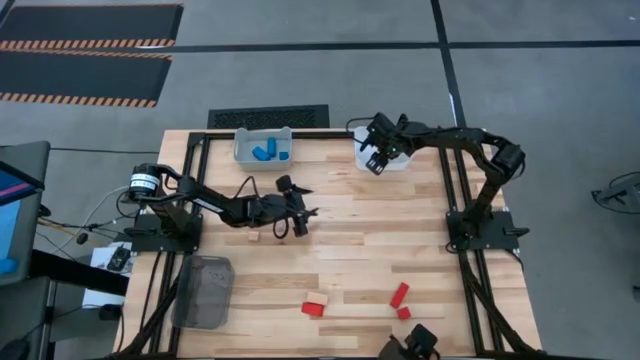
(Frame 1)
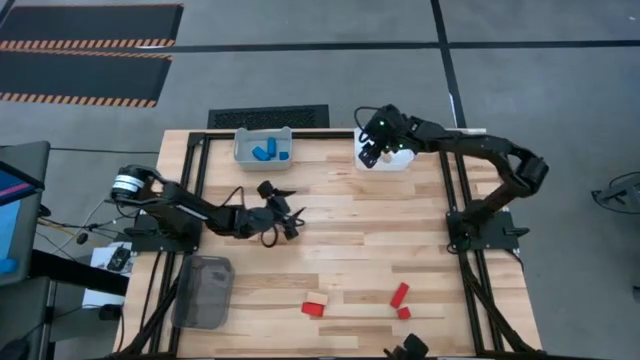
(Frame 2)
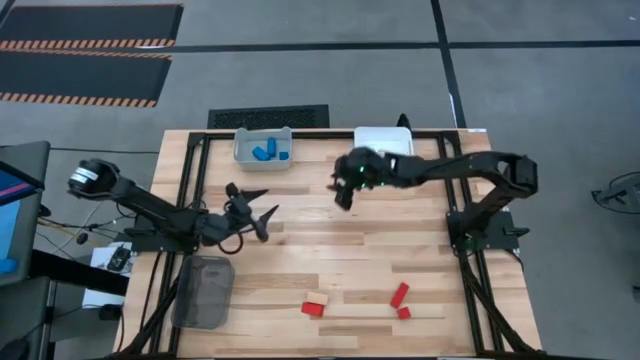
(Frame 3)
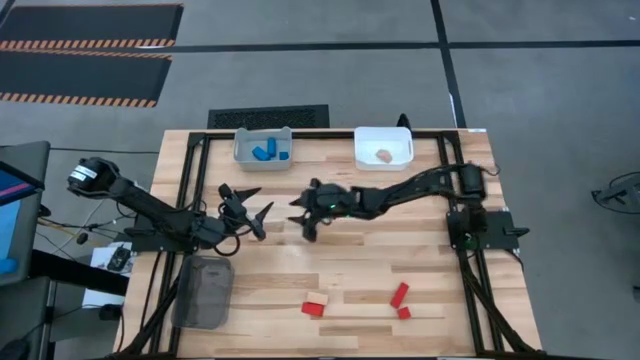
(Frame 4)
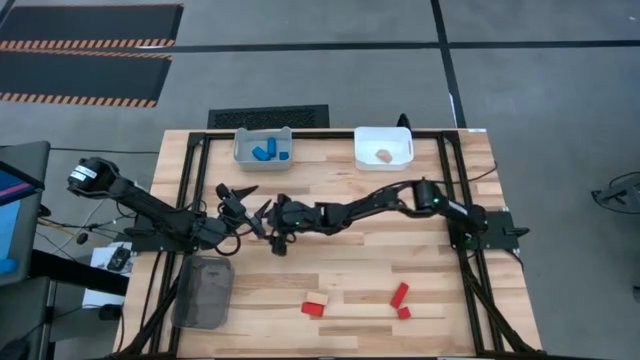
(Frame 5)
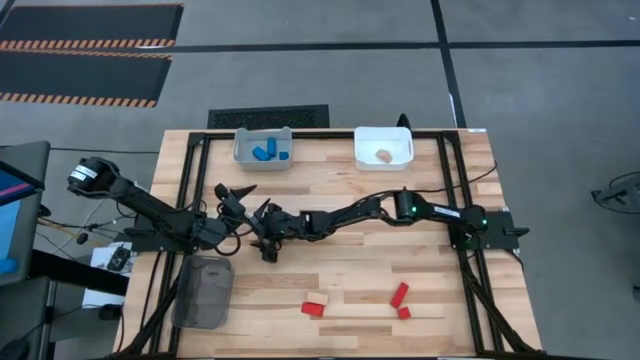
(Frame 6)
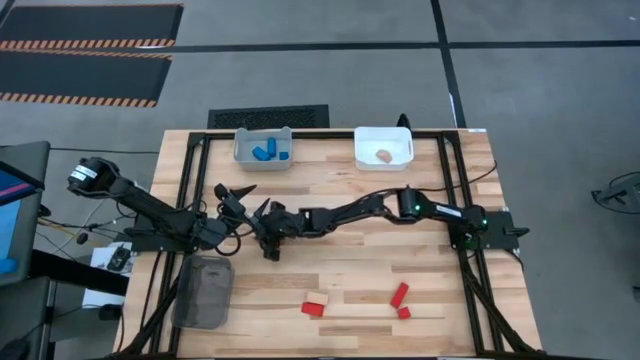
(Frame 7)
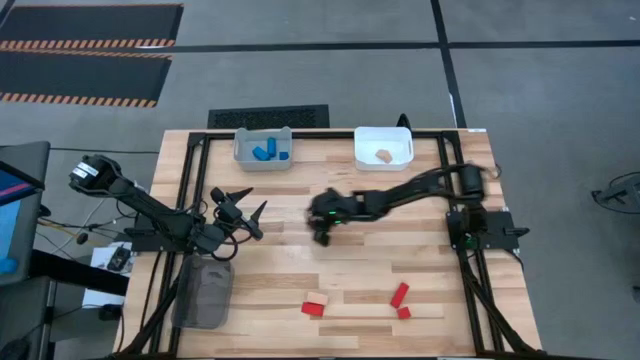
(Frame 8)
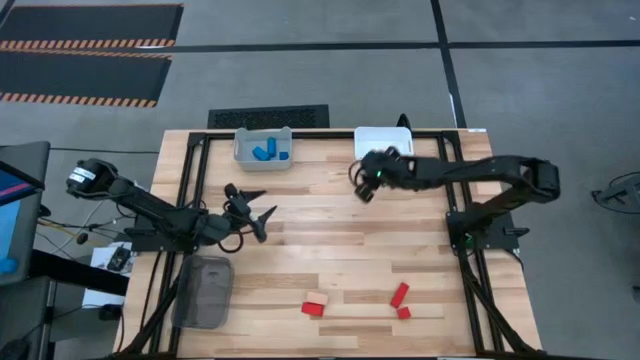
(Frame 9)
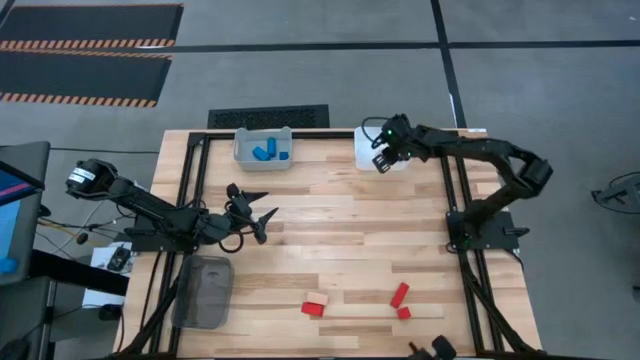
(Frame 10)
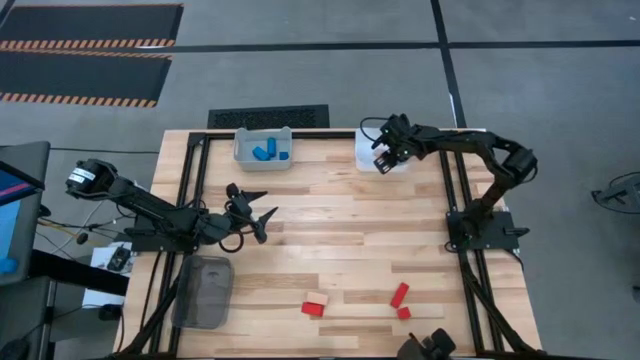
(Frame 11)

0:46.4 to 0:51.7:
Task: Sort & place blocks by color
Put the brown triangle block into the white bin

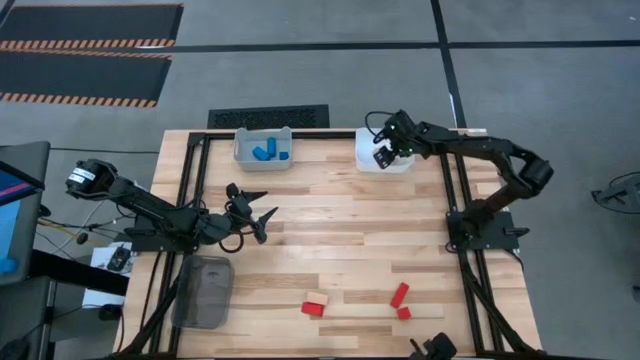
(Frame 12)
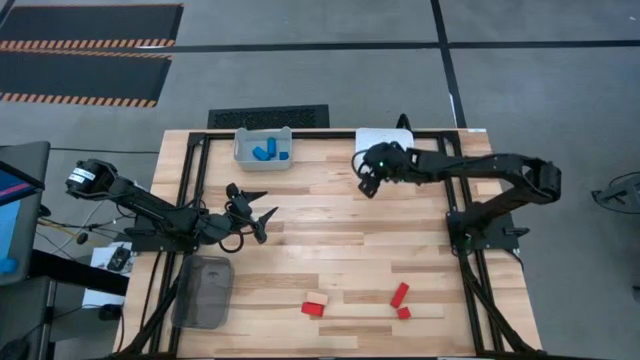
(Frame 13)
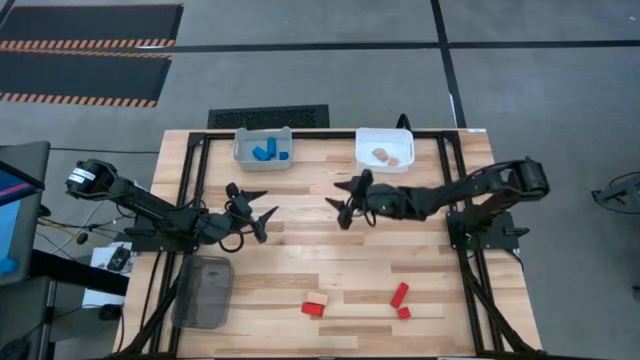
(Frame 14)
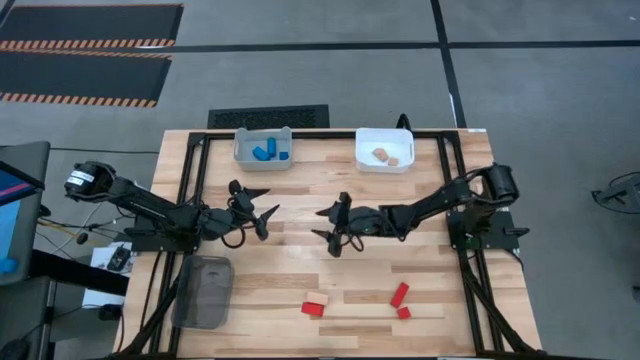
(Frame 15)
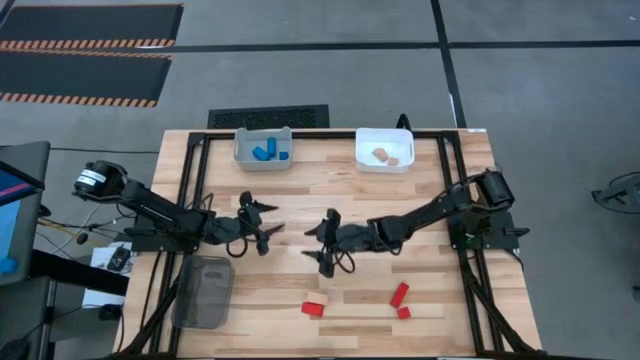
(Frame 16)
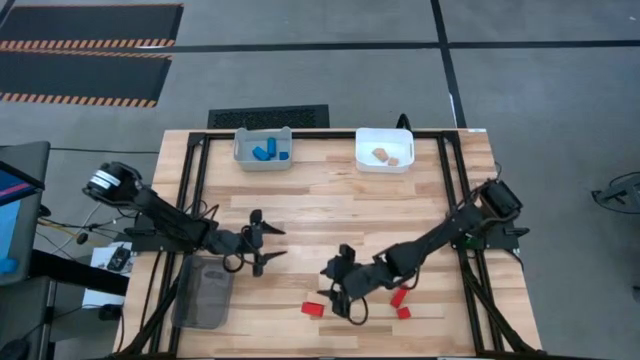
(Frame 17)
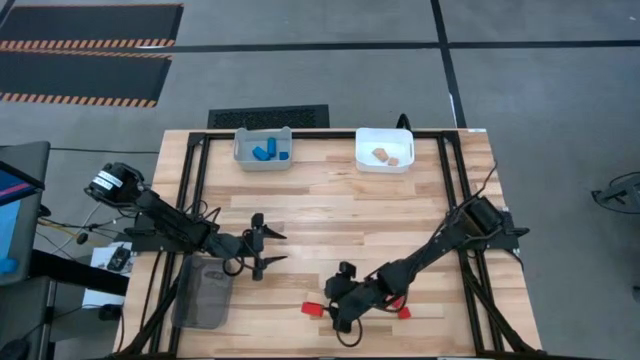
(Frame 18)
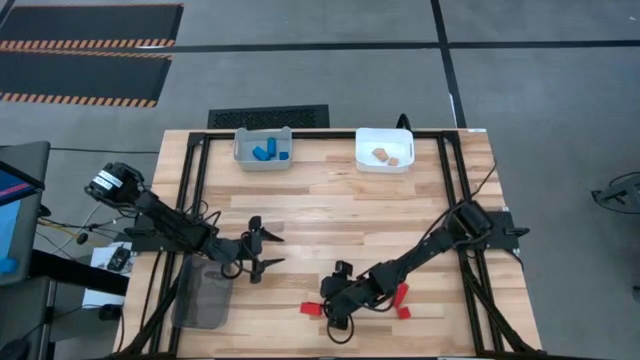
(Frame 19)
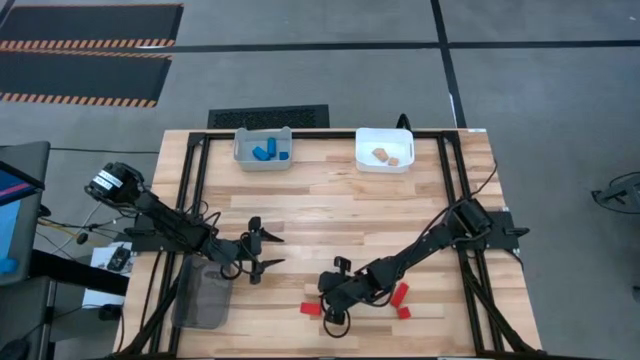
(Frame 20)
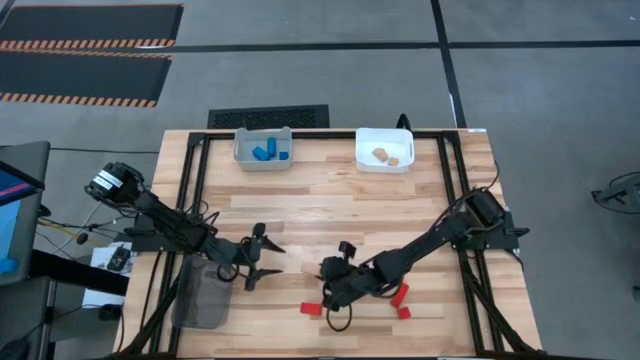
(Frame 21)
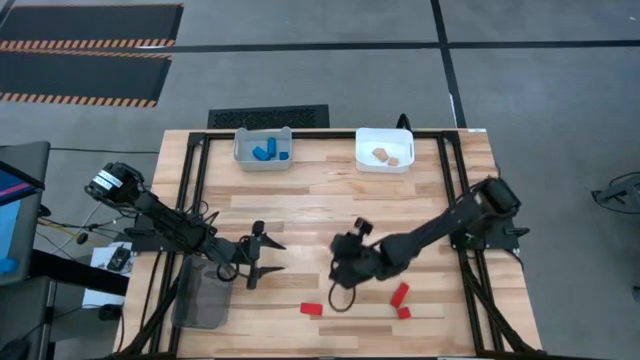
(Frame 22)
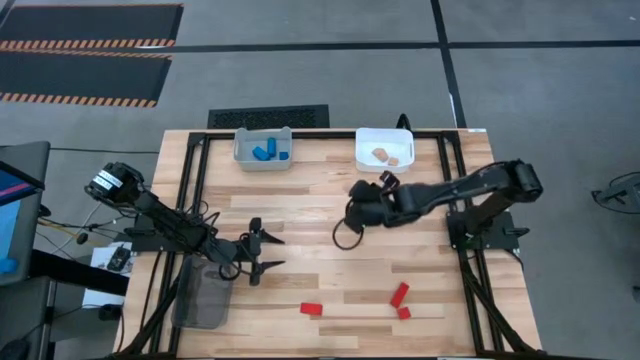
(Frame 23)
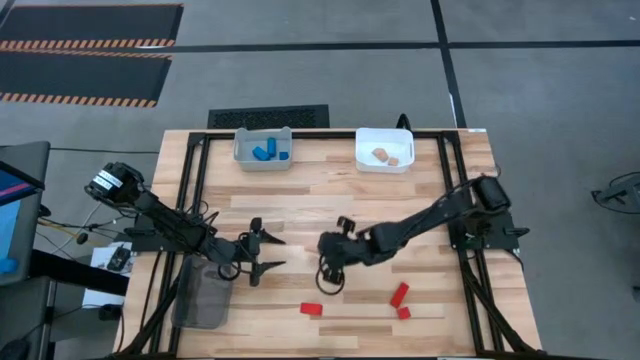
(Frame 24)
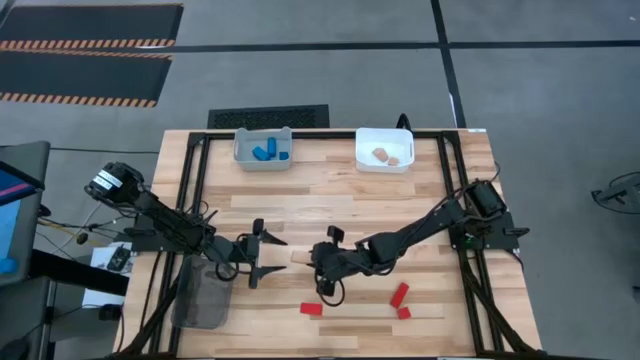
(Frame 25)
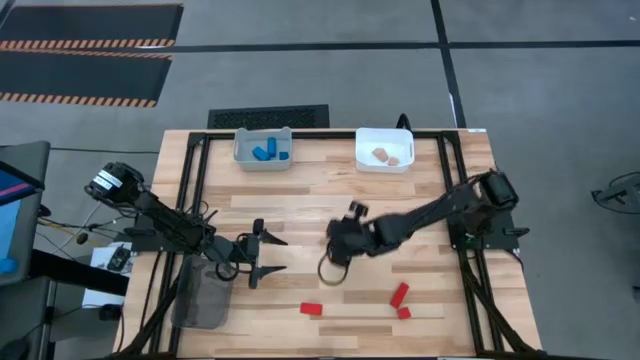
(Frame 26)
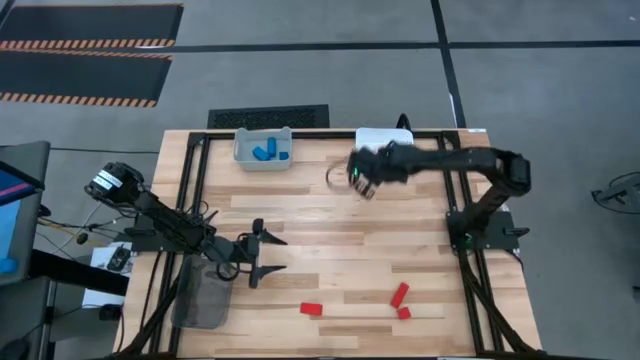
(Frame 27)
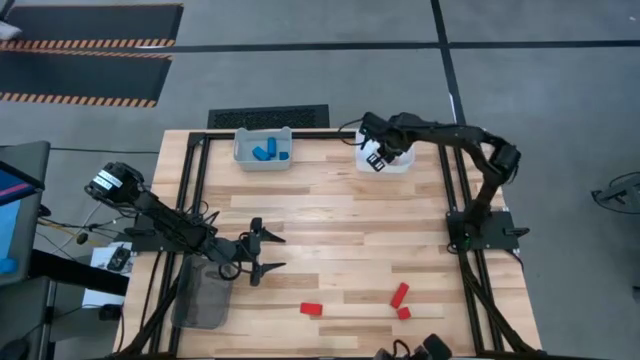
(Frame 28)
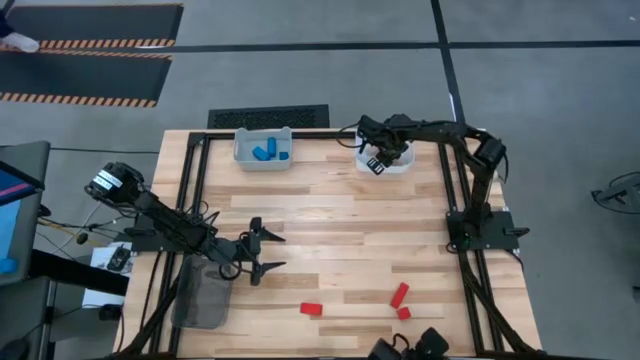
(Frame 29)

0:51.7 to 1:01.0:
Put the brown rectangle block into the white bin

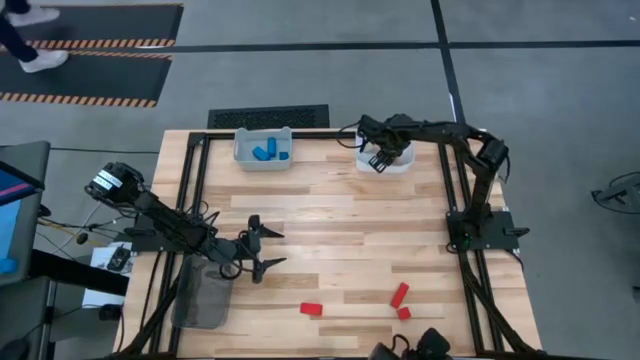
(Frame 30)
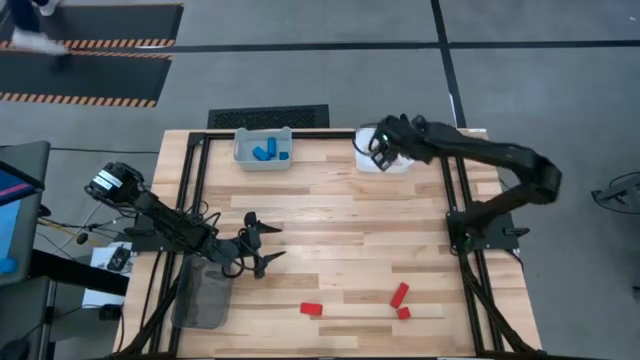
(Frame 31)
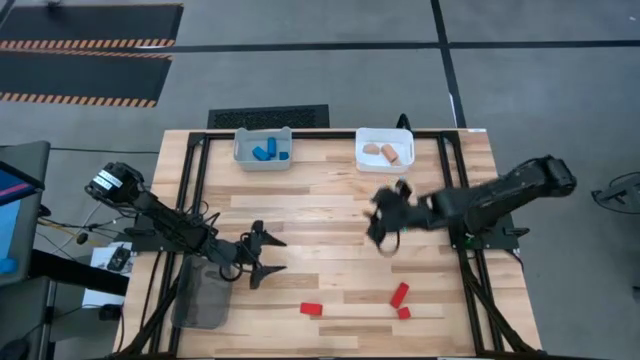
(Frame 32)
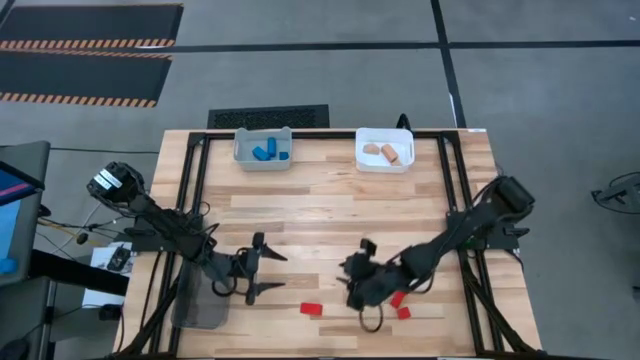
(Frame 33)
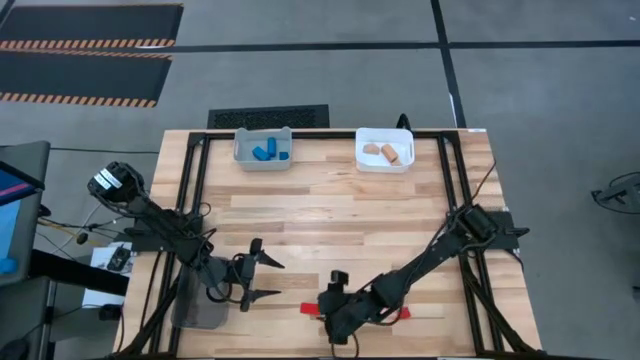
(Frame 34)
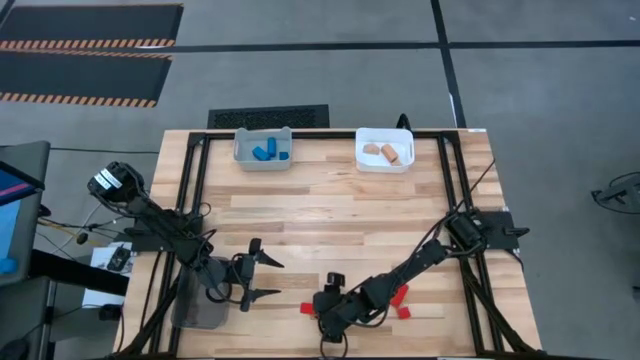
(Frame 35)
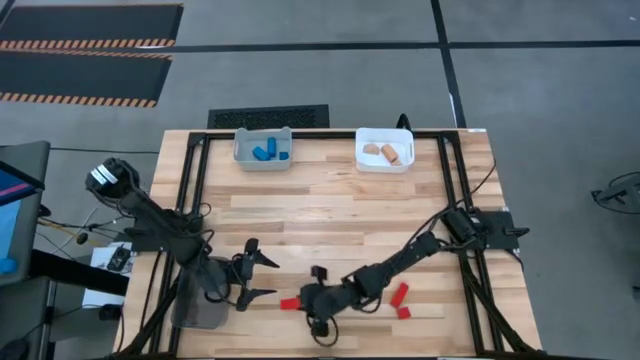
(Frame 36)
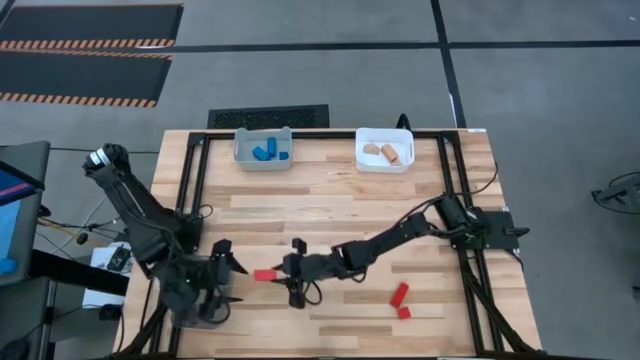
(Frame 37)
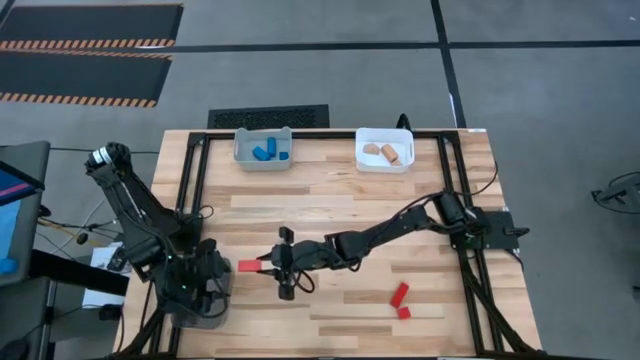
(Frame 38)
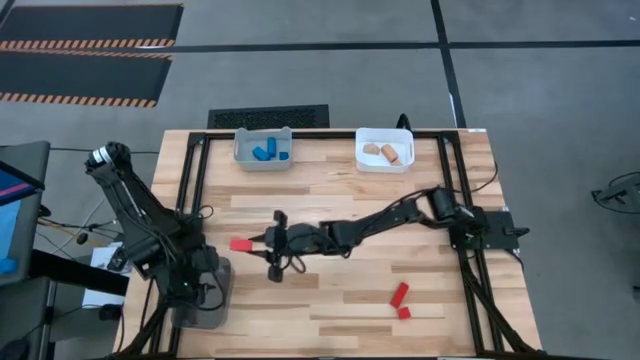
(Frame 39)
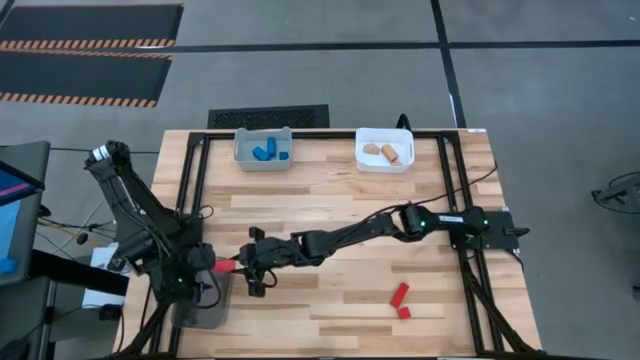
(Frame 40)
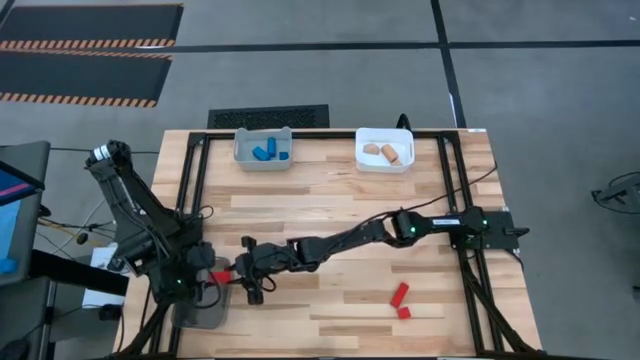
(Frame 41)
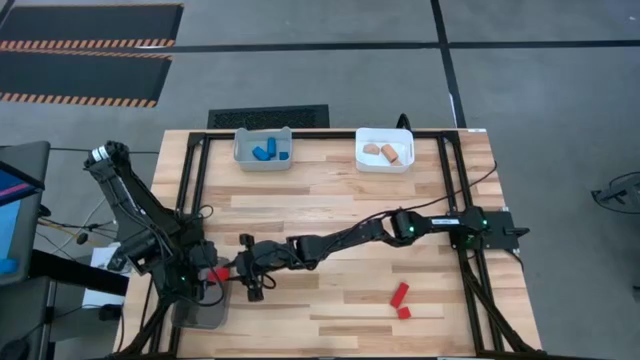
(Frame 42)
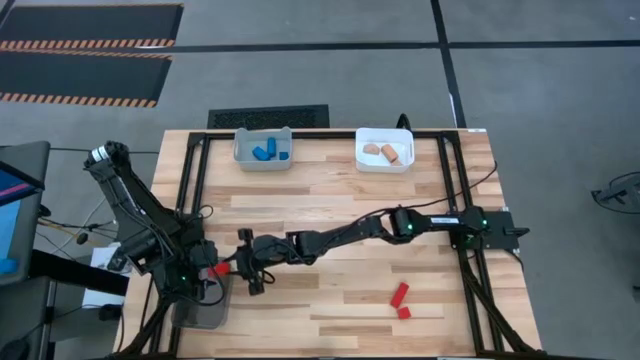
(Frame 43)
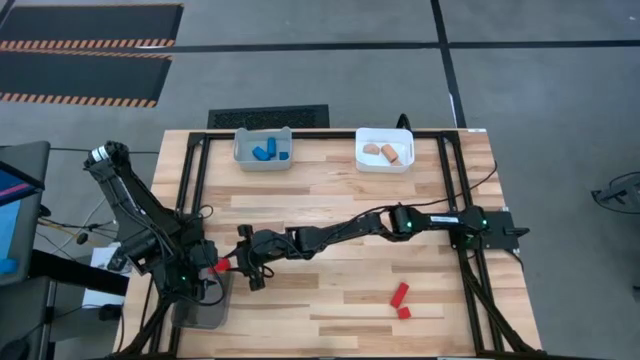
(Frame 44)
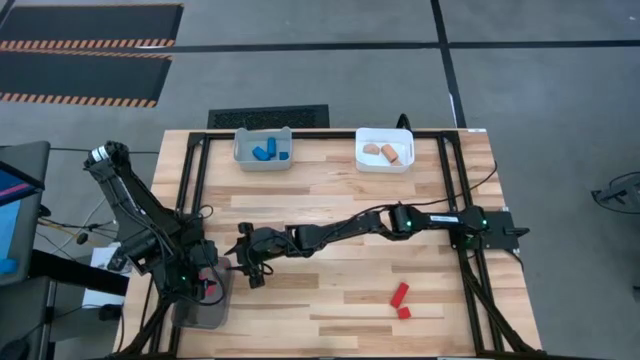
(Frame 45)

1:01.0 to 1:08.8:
Put the red triangle block into the black bin
